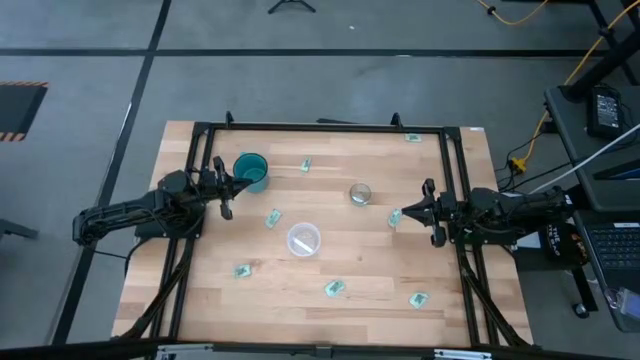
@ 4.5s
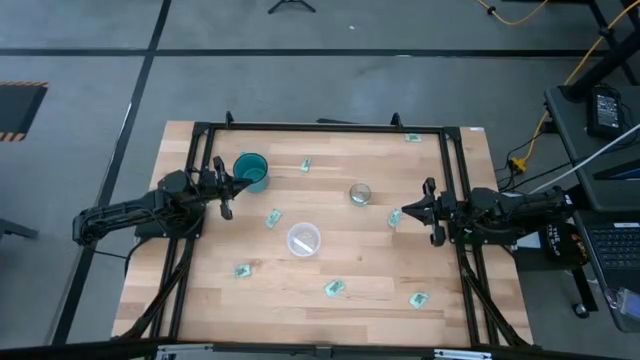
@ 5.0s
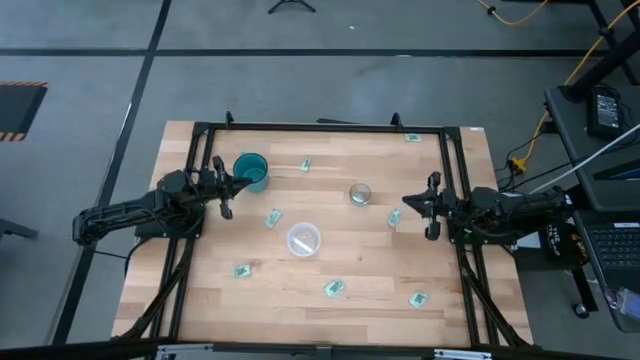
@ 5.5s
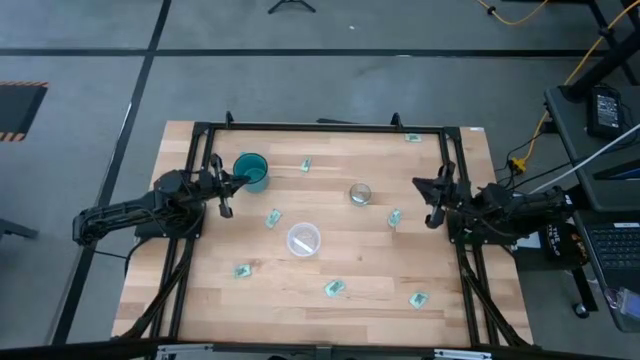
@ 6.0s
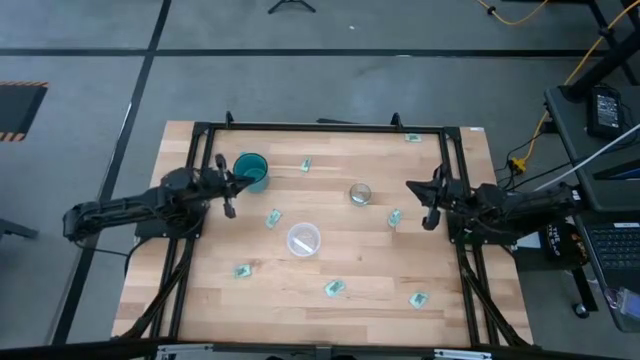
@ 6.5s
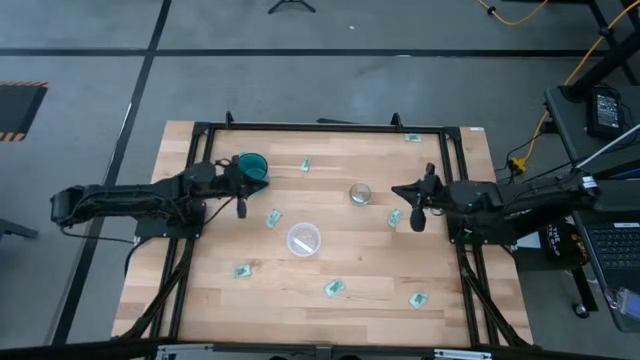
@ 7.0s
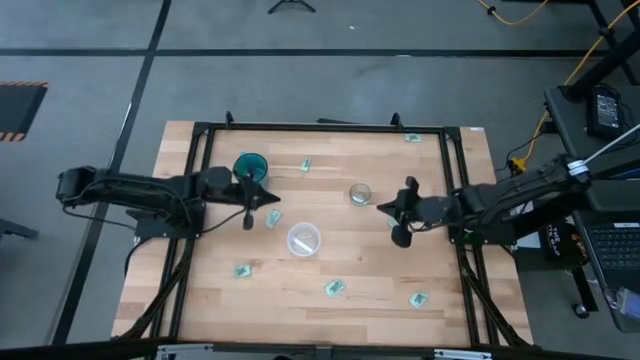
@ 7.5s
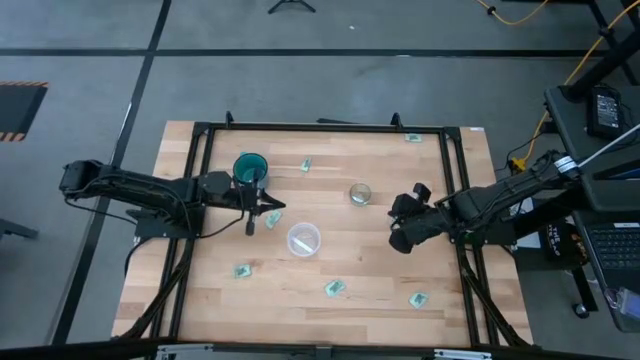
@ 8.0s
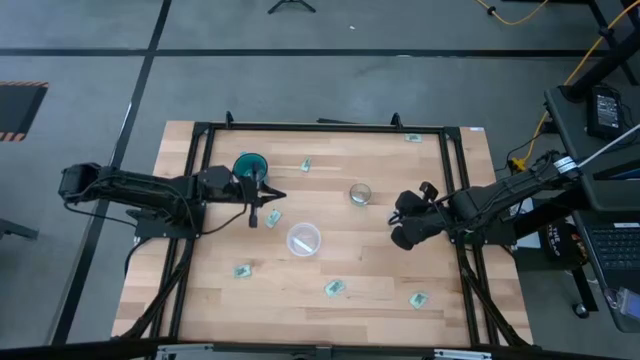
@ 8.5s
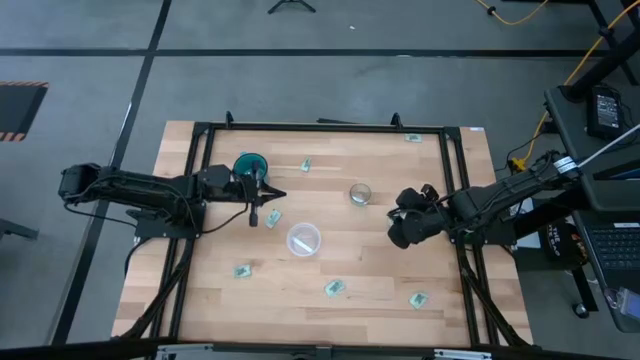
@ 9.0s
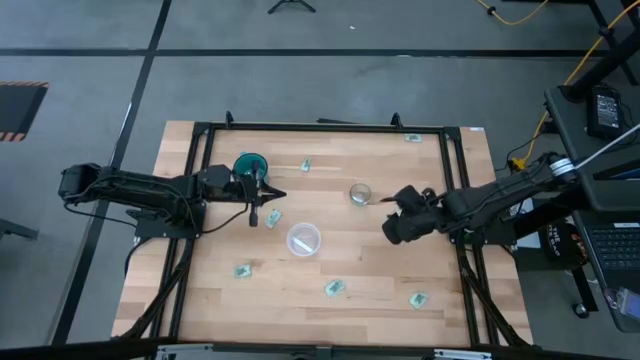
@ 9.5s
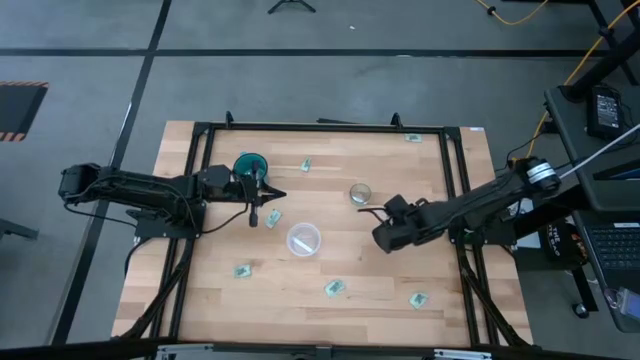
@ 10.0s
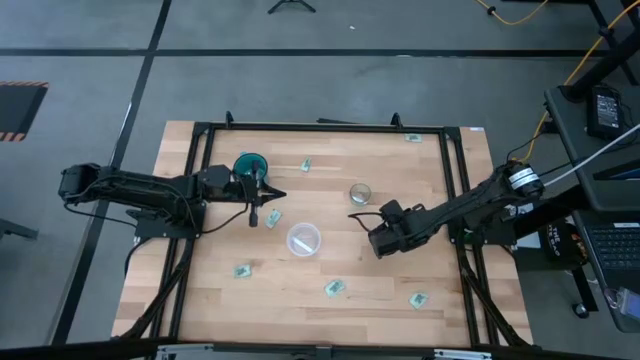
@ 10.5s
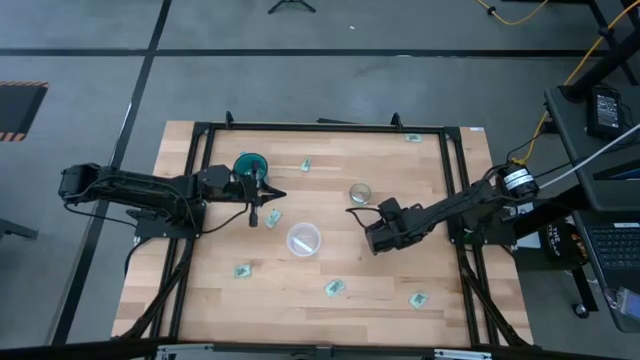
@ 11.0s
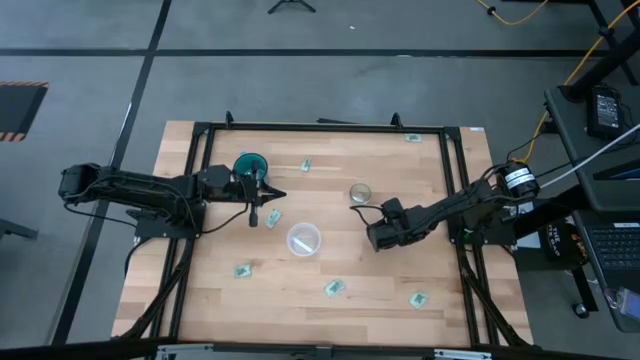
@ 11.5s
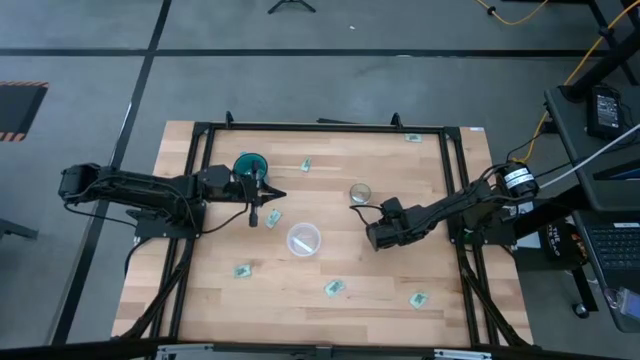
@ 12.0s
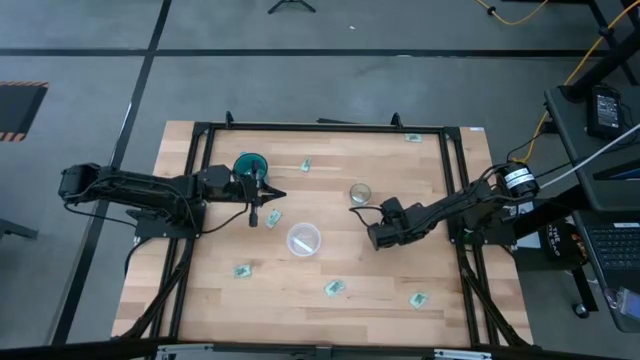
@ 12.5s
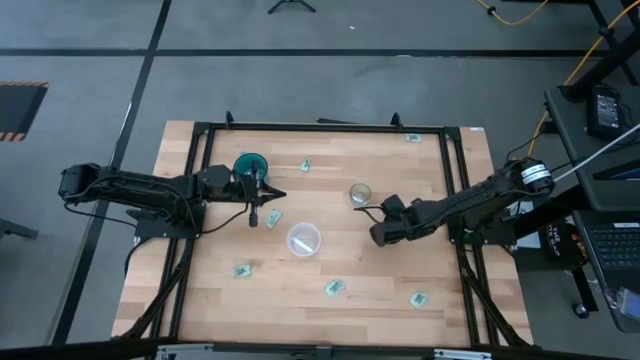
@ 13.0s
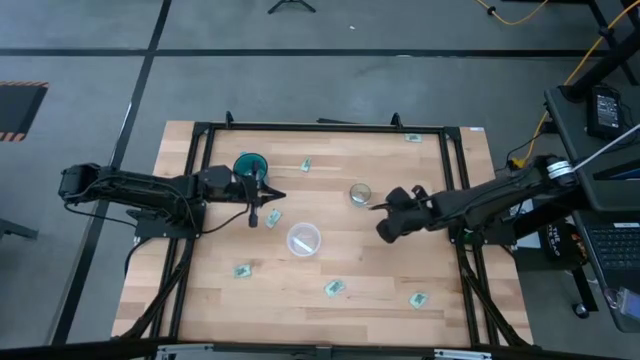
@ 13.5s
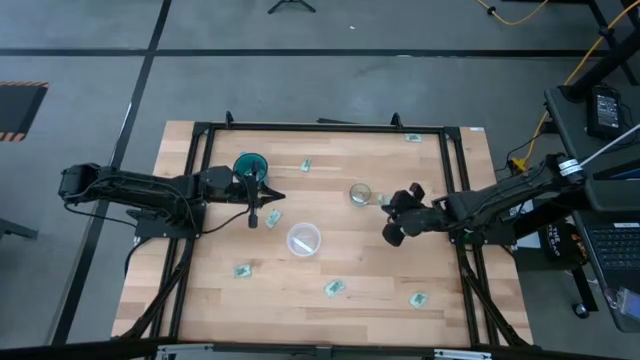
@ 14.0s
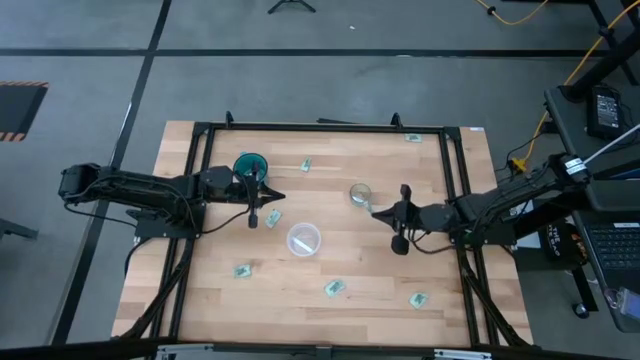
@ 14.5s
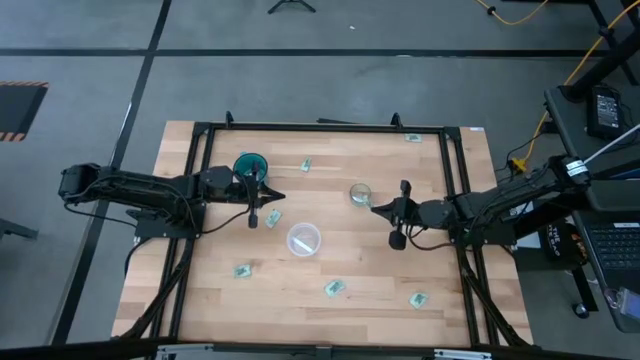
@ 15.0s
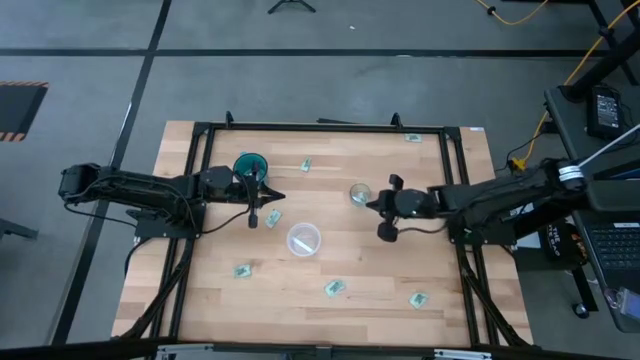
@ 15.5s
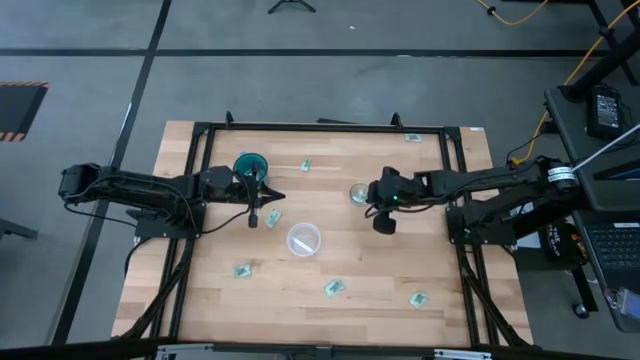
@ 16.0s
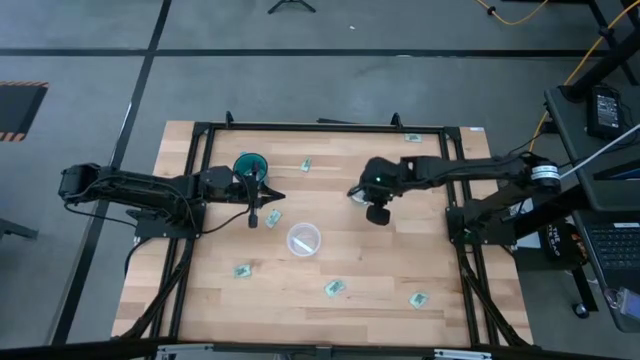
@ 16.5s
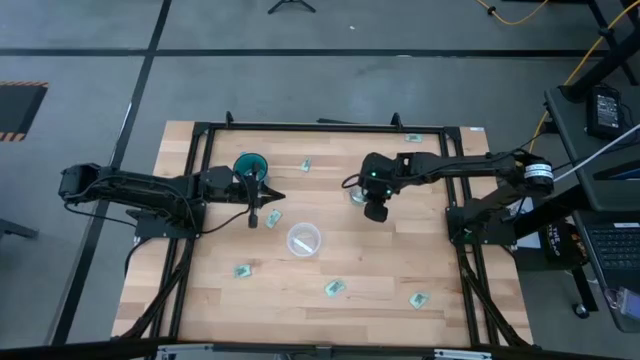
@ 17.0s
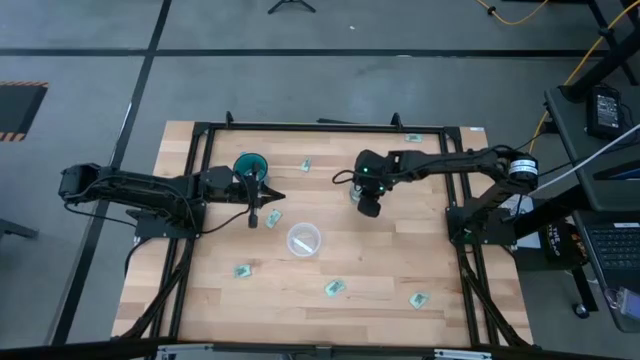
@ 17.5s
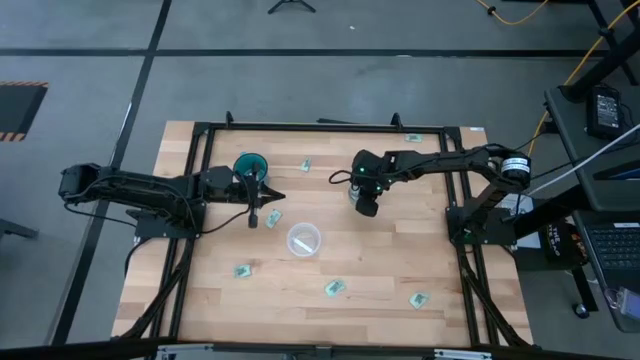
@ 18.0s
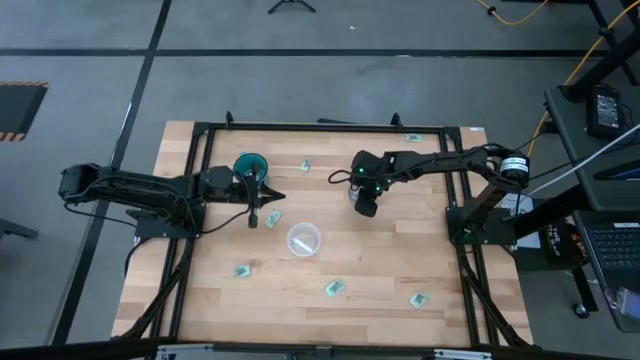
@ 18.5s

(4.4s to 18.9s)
Task: Pick and place Stevia / Truvia into bins
Put the white stevia packet into the transparent glass container

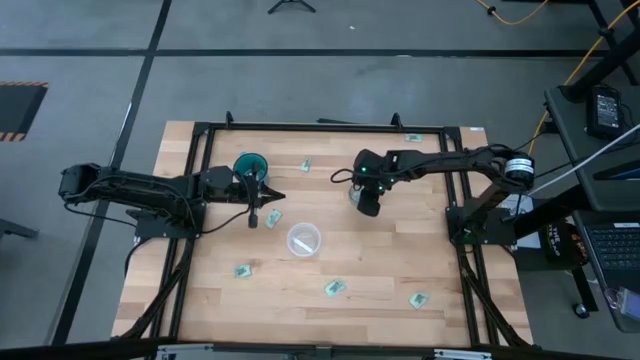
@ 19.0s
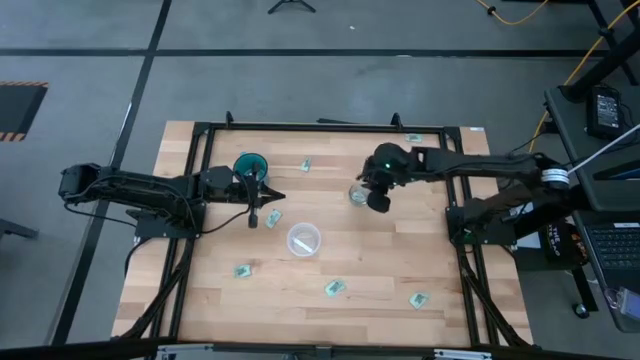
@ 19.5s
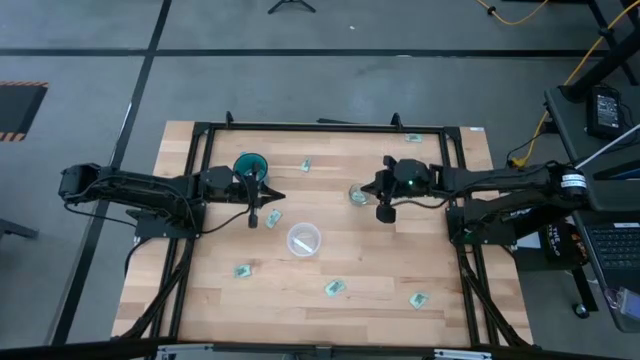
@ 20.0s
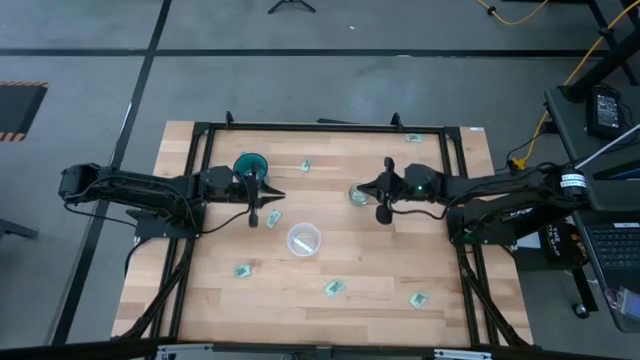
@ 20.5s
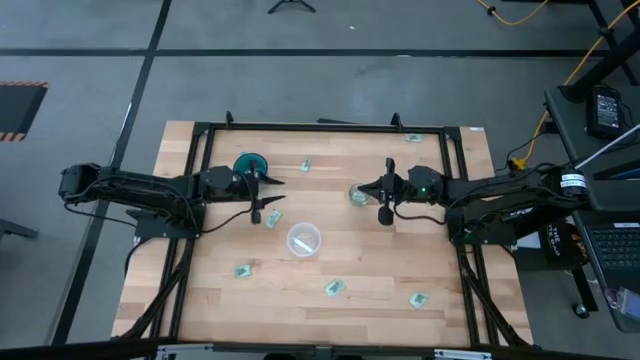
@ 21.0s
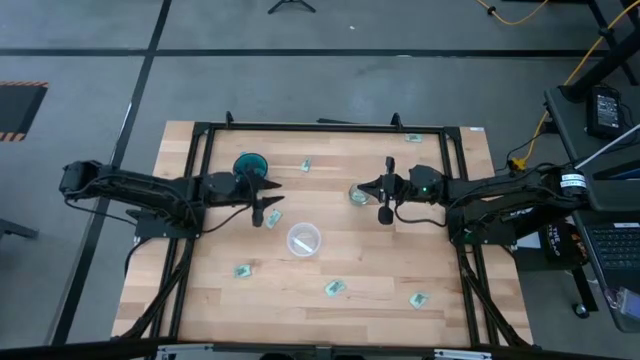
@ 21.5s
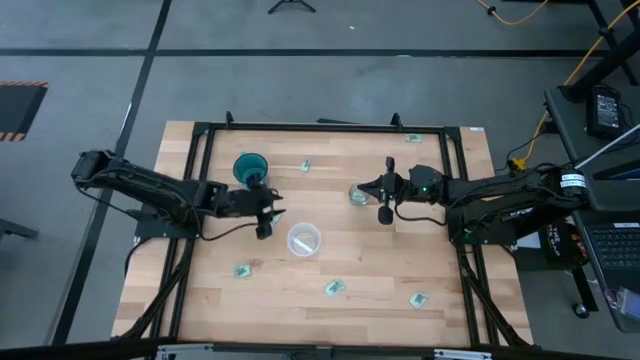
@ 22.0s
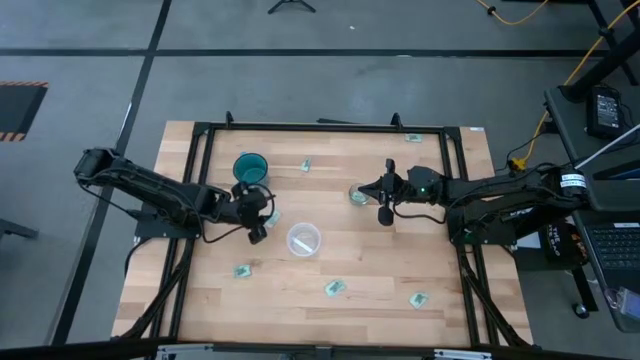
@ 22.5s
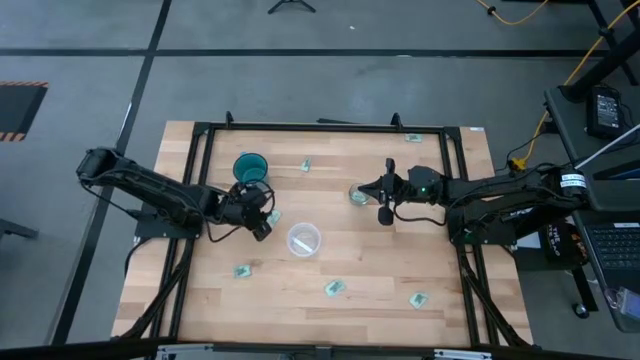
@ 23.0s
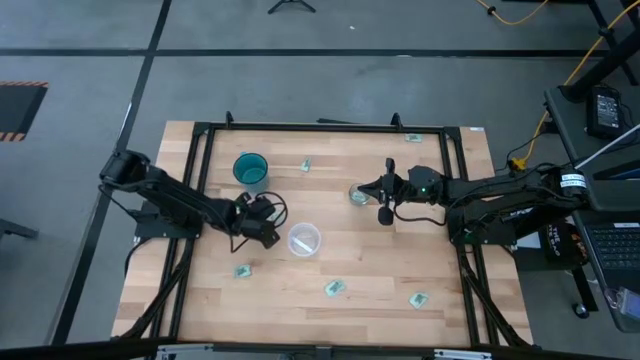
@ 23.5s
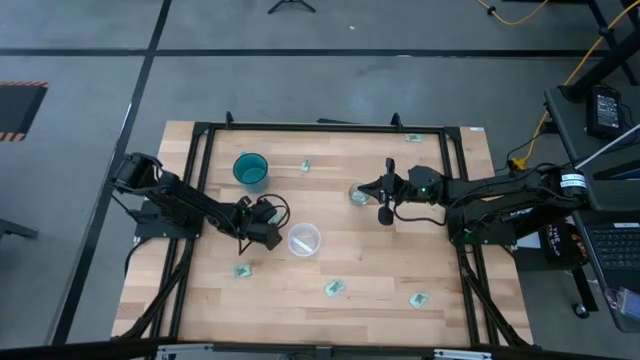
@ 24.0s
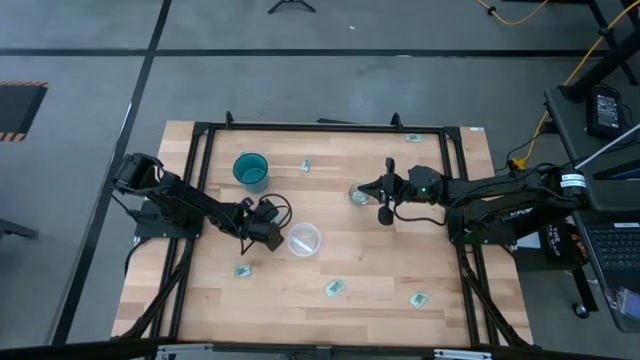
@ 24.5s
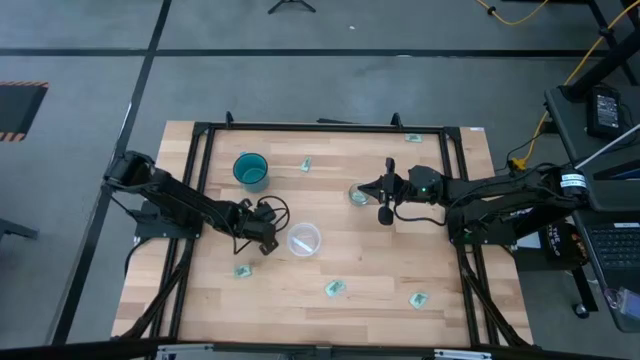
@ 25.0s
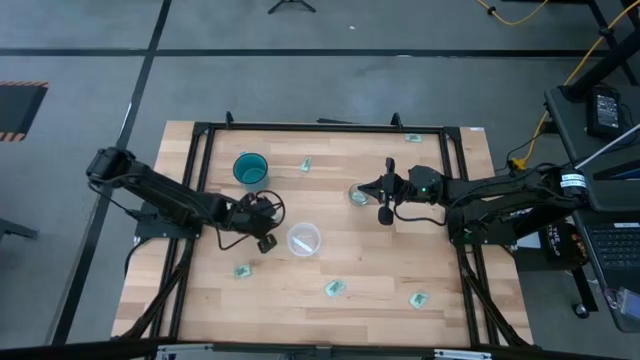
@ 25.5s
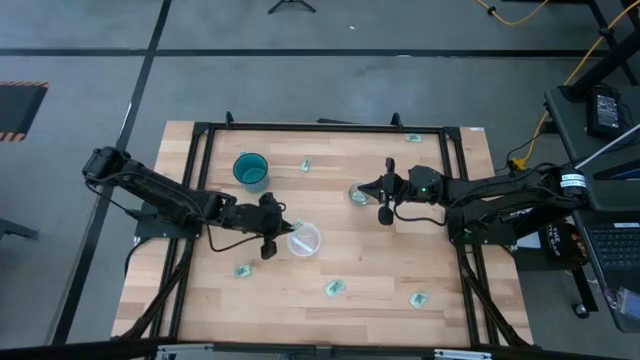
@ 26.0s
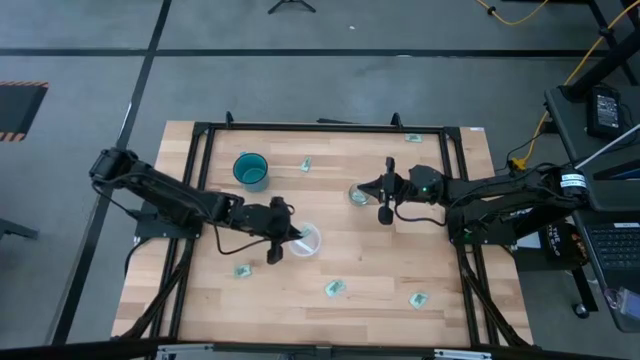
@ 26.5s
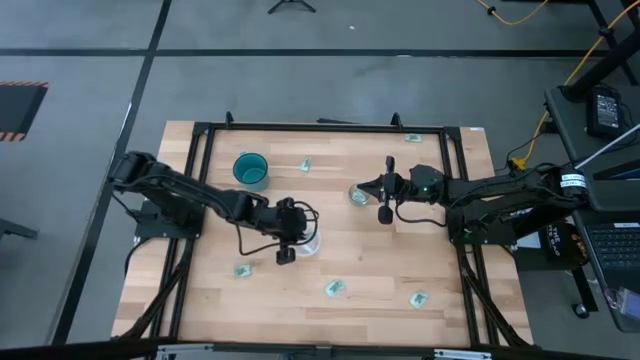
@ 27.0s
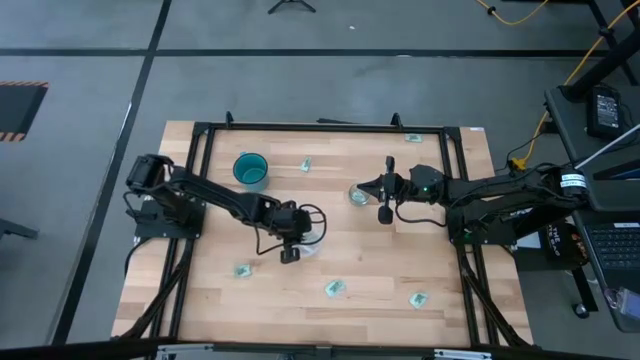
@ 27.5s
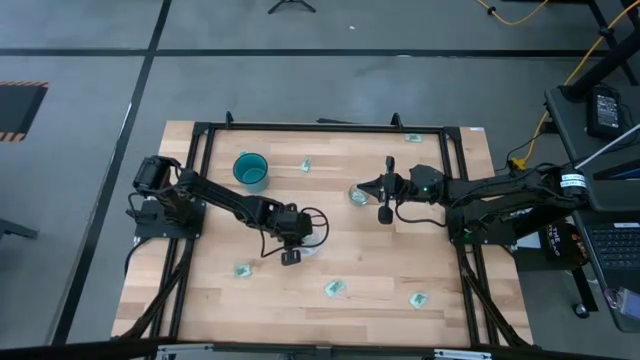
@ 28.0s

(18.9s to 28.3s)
Put the white stevia packet into the transparent plastic container
